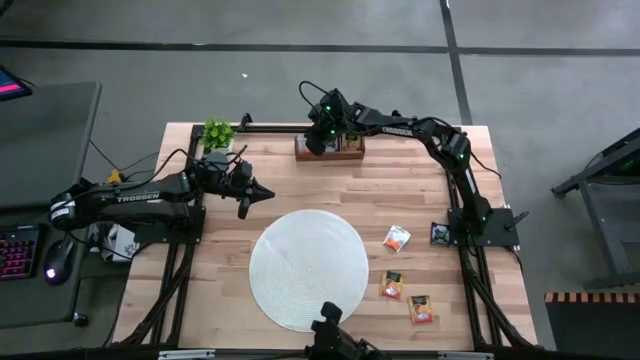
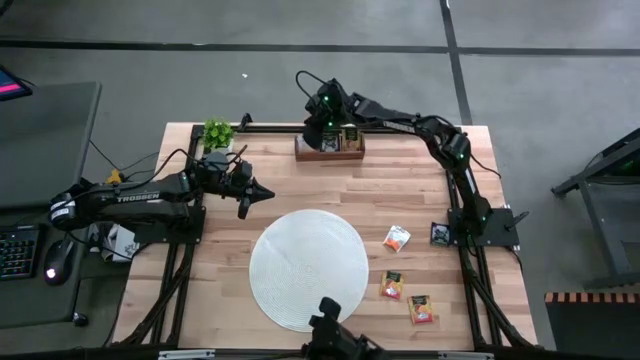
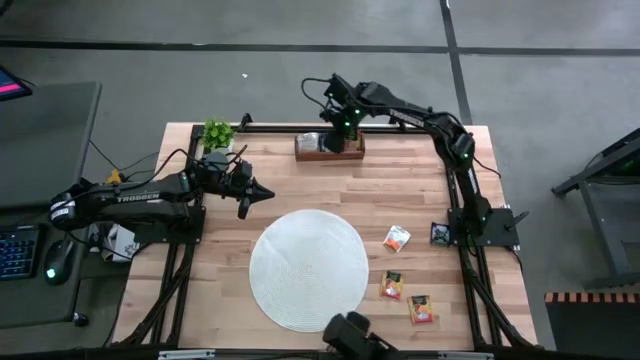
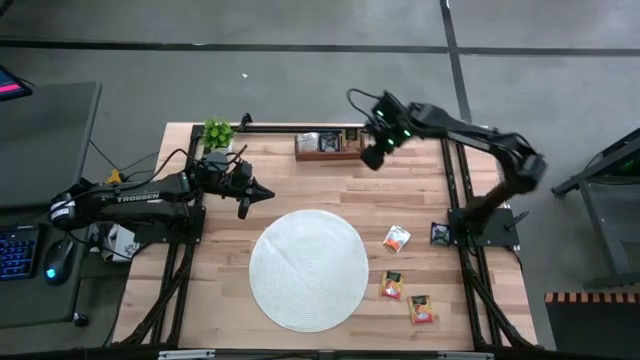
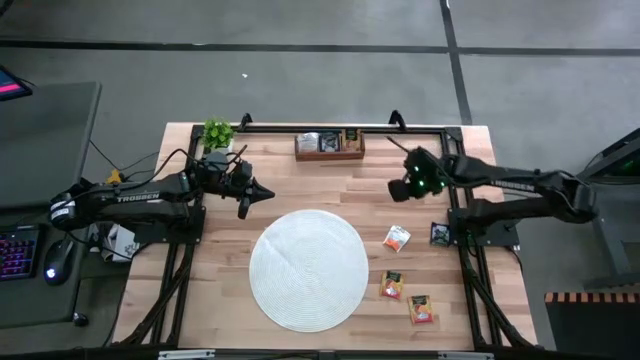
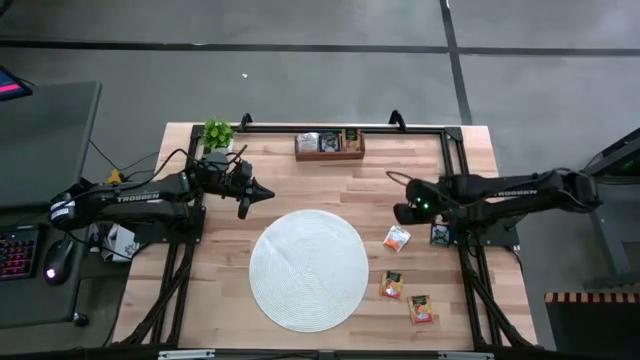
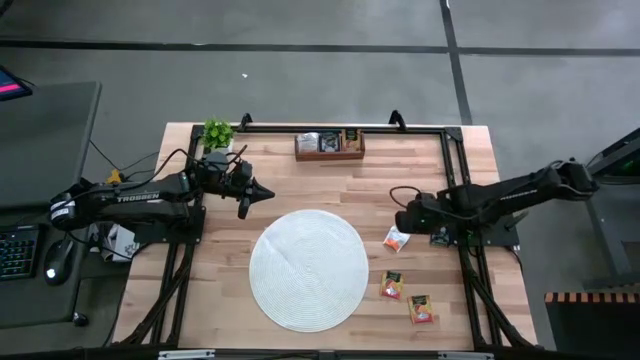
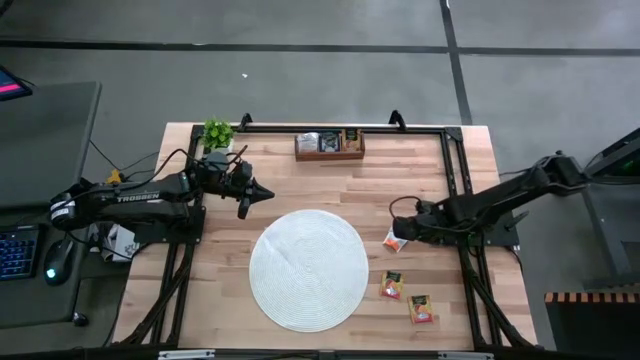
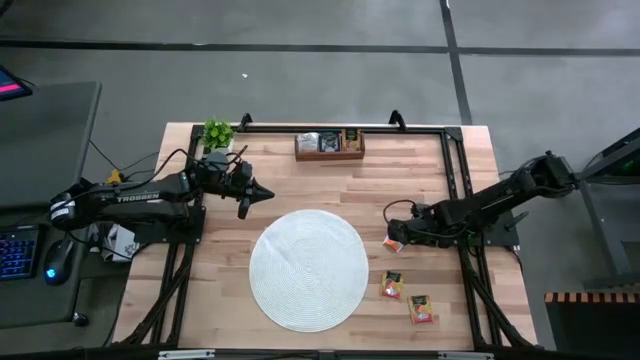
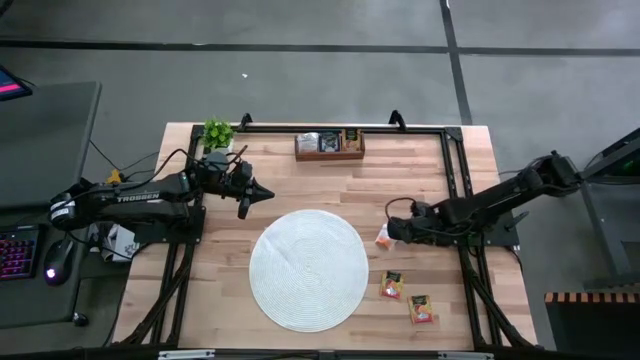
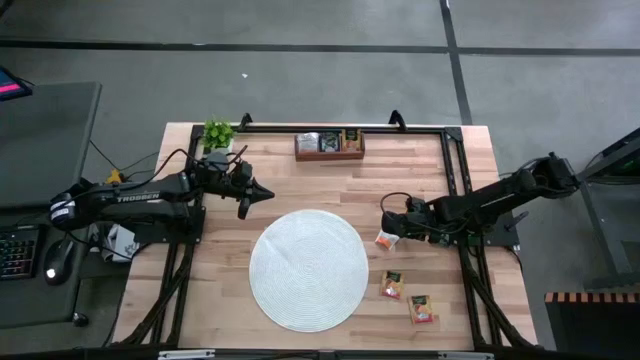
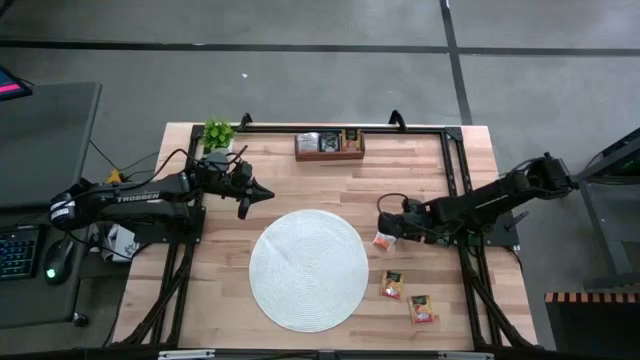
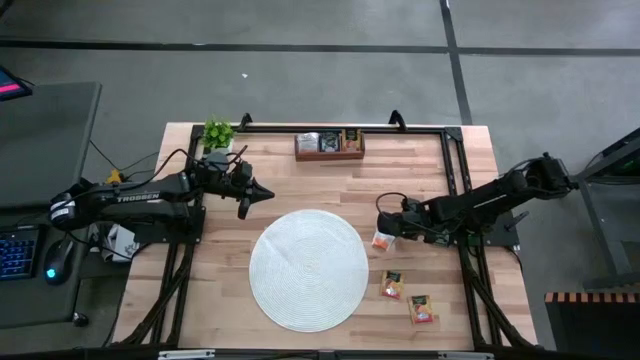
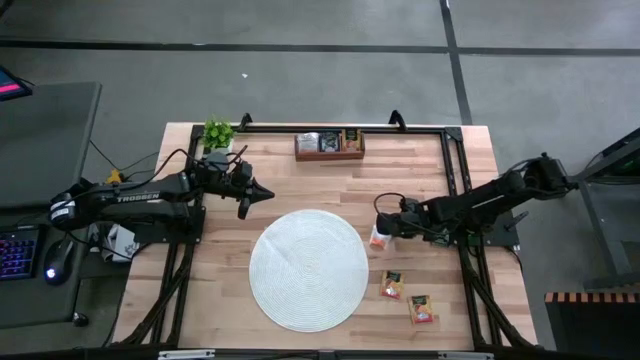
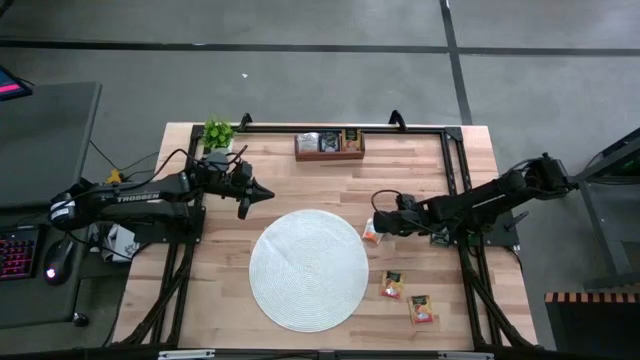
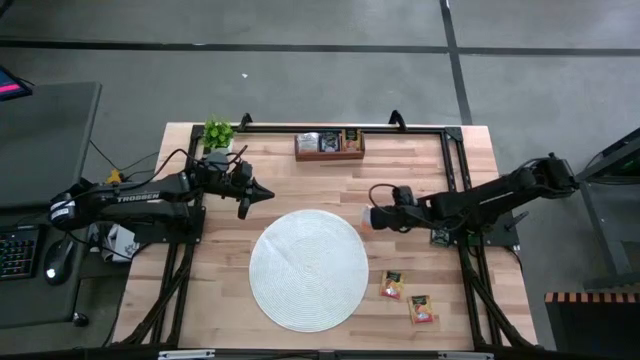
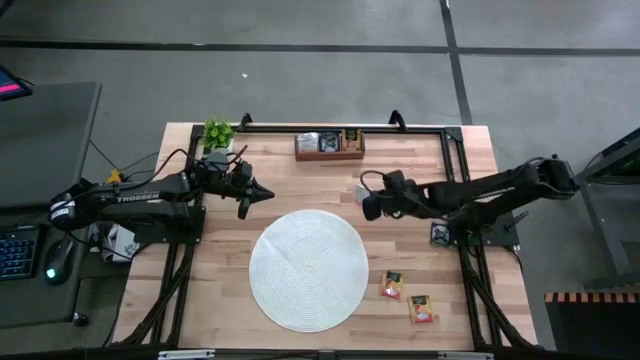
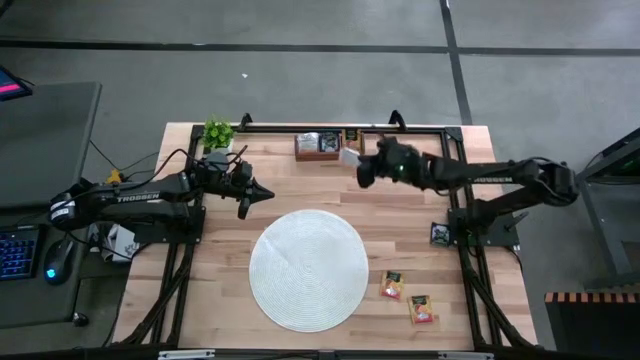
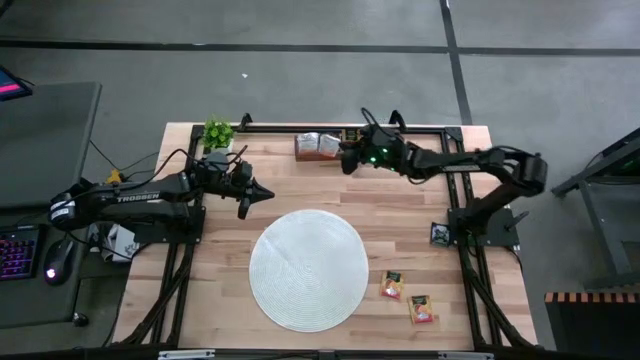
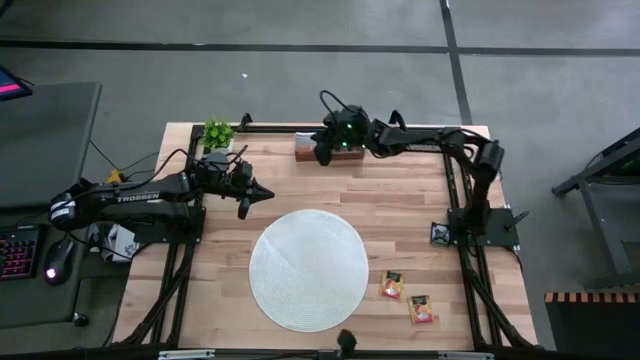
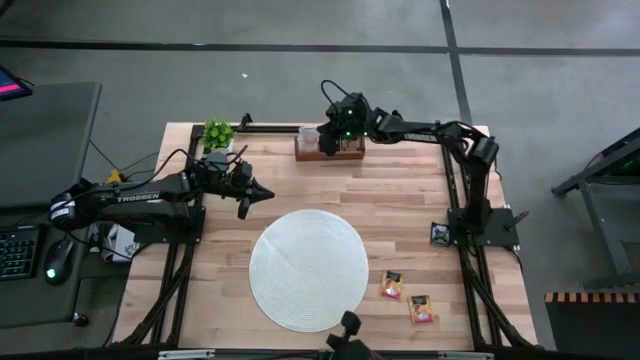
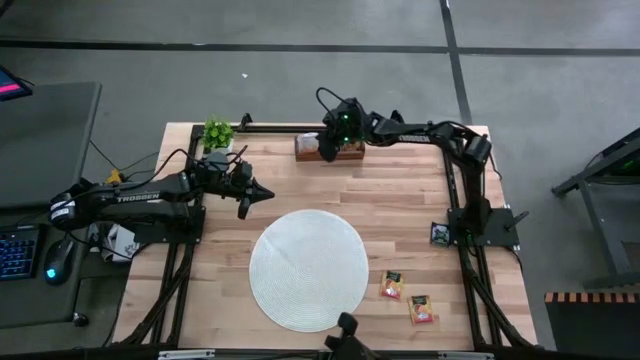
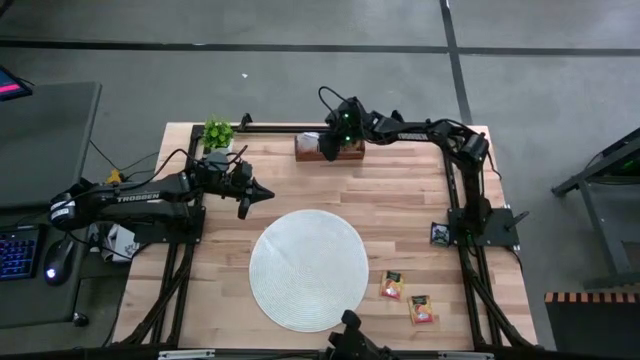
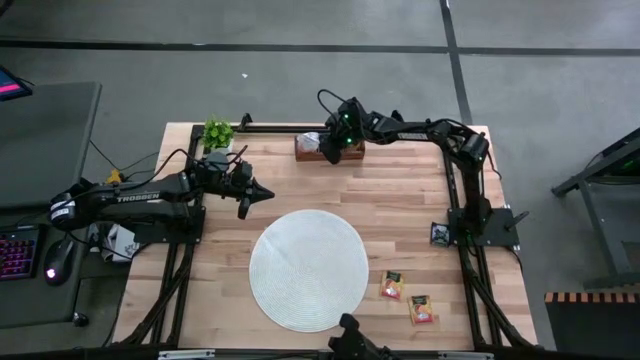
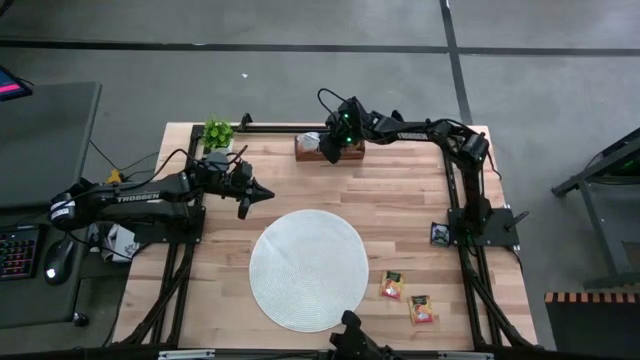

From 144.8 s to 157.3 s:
Task: Pick & Place Tea
Put the white tea bag into the left section of the wooden organizer

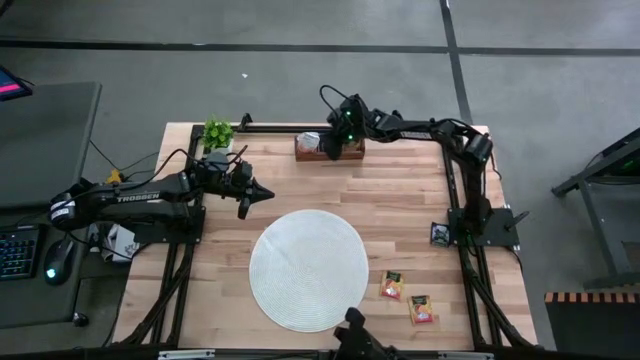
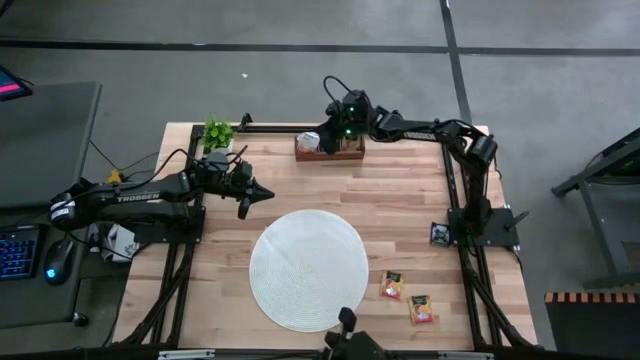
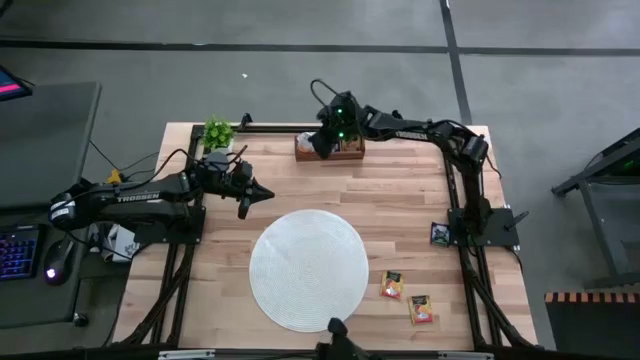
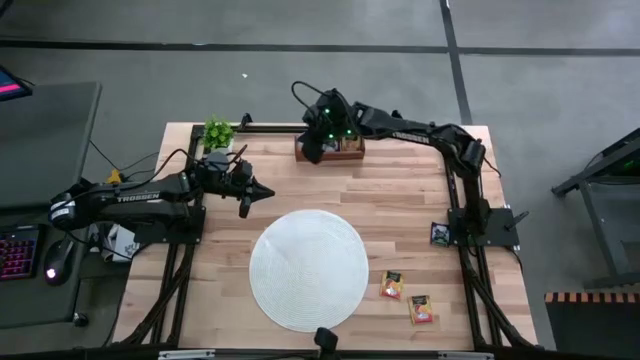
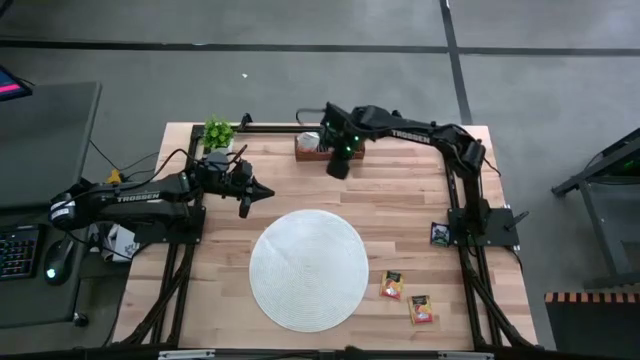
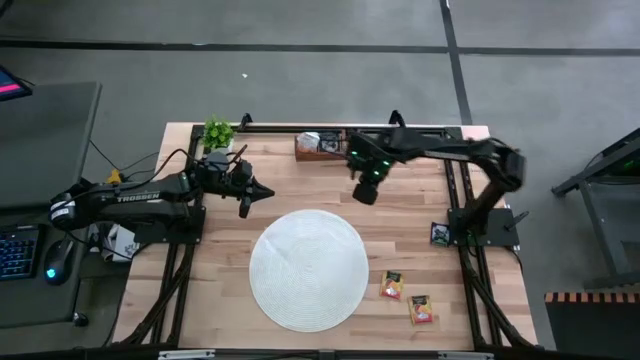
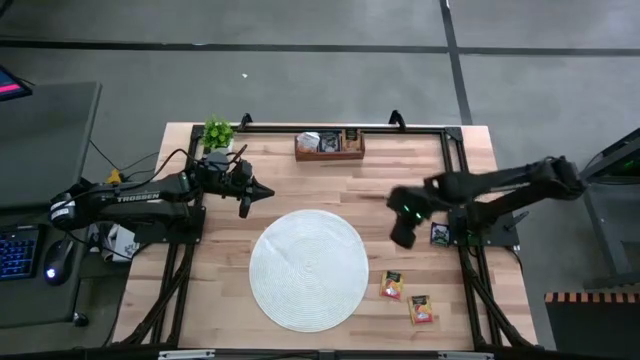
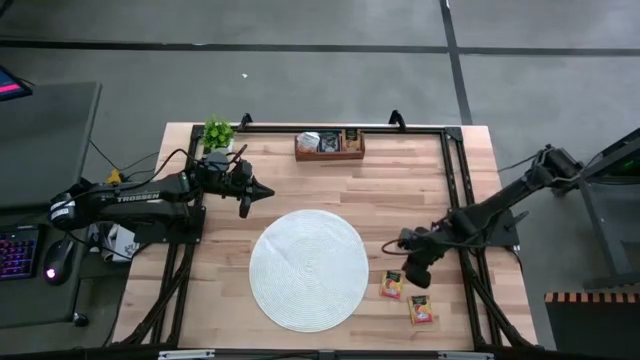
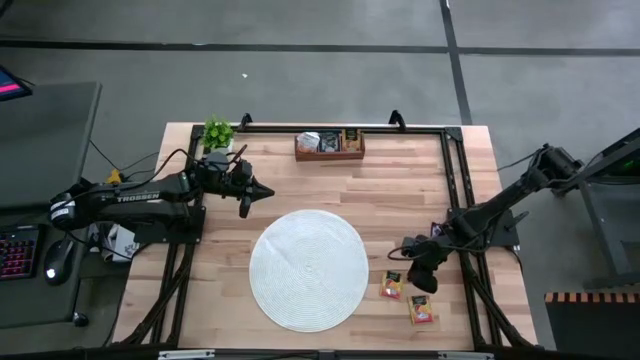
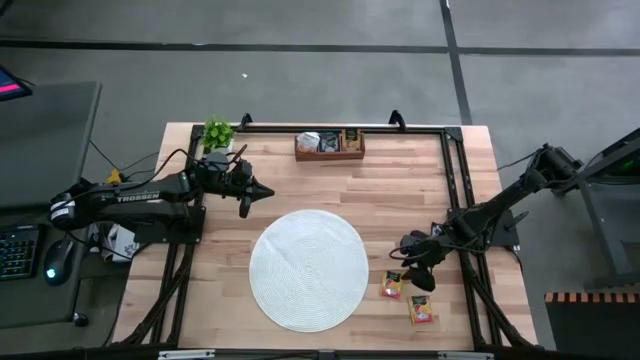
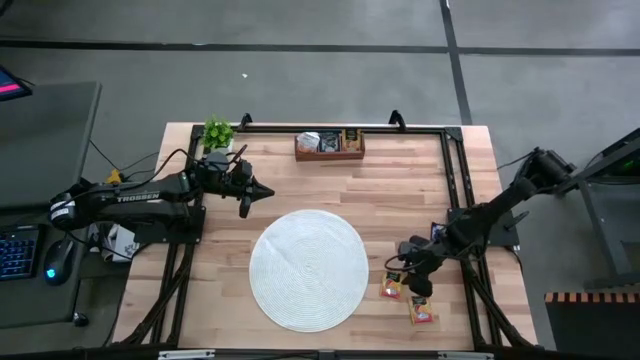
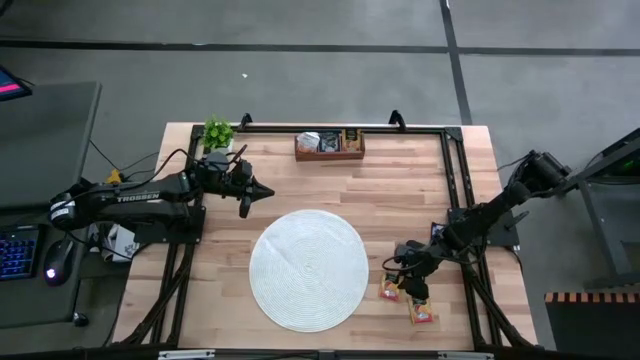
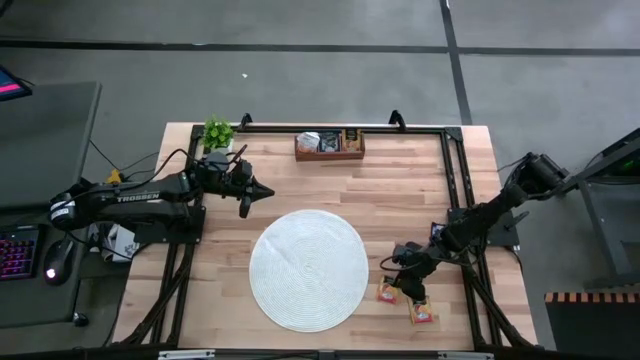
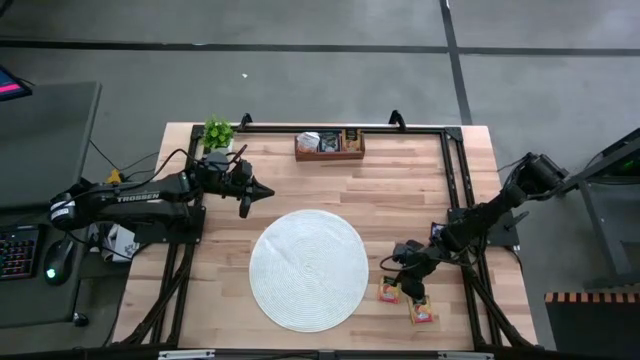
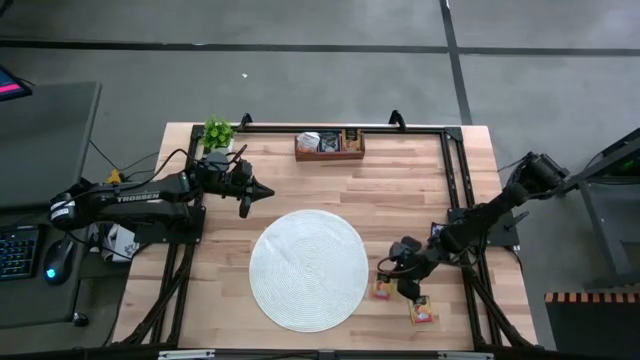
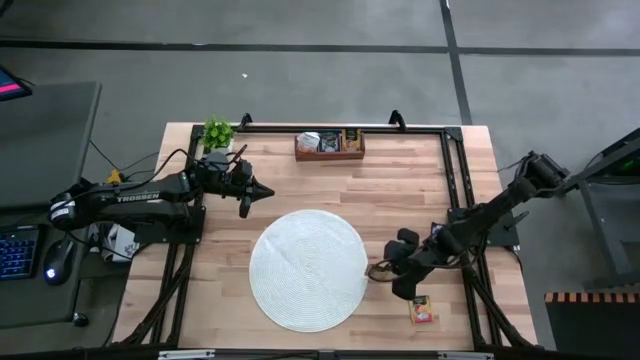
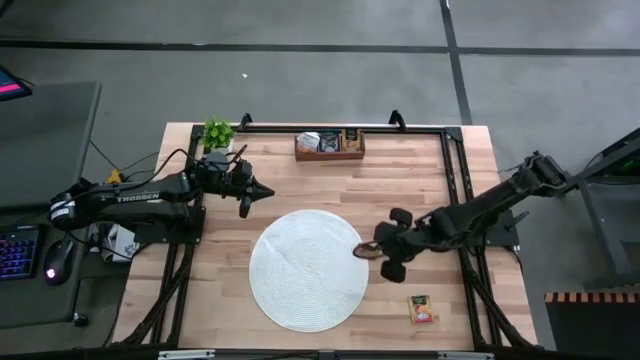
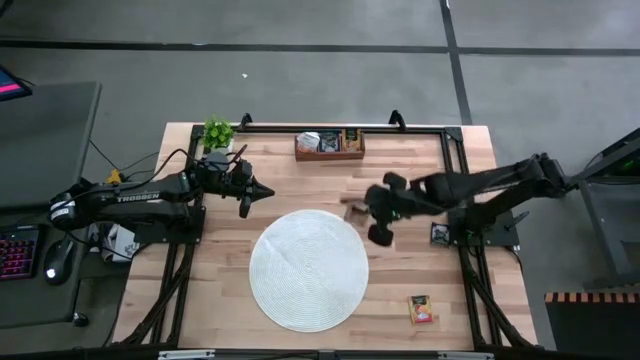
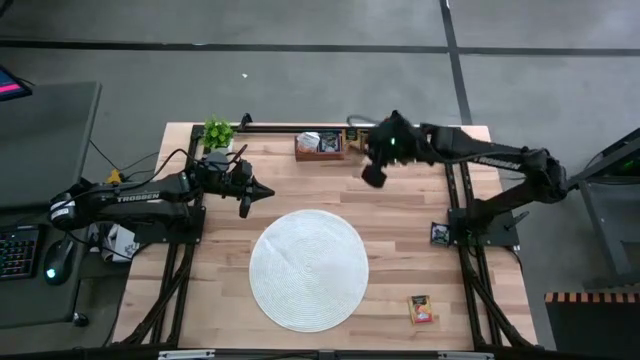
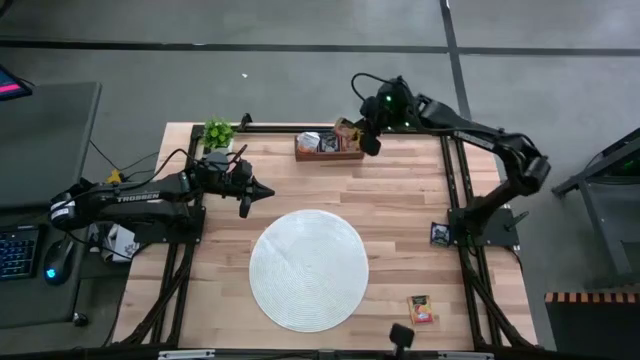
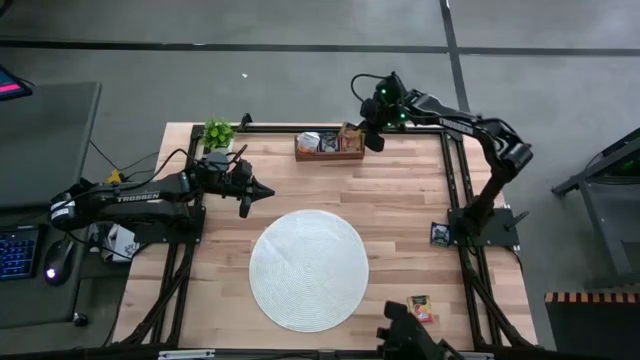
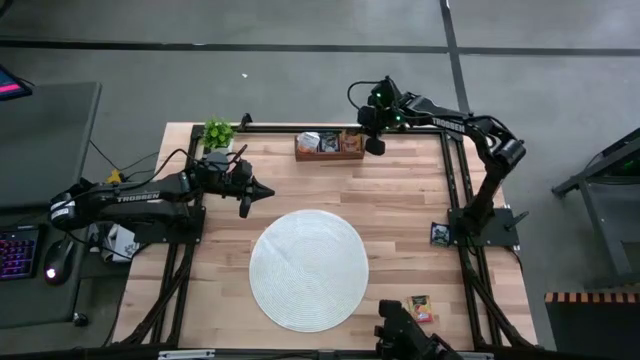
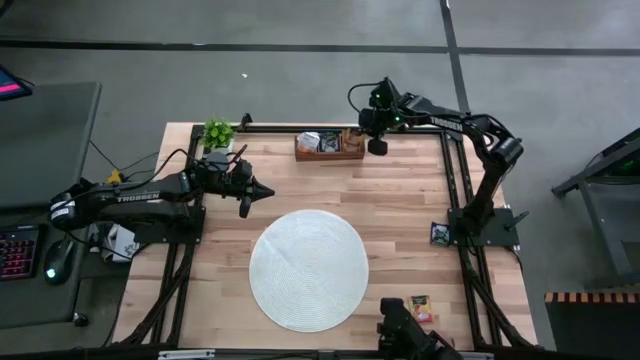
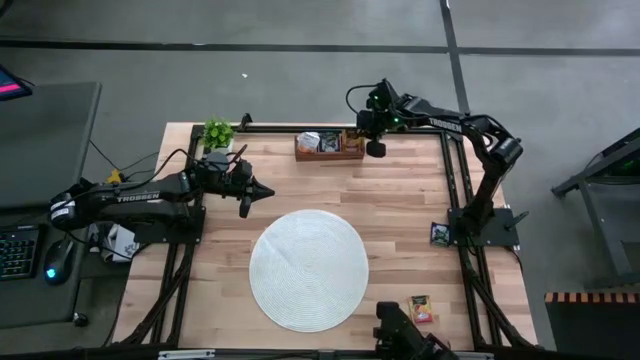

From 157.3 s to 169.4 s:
Put the yellow tea bag into the right section of the wooden organizer
